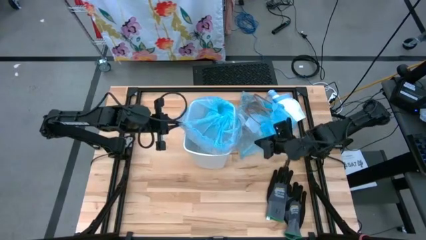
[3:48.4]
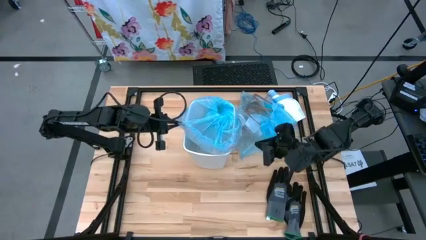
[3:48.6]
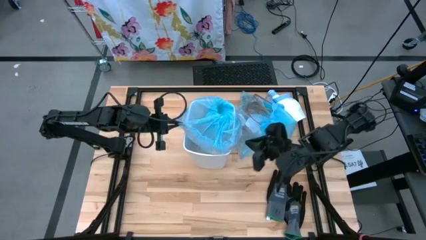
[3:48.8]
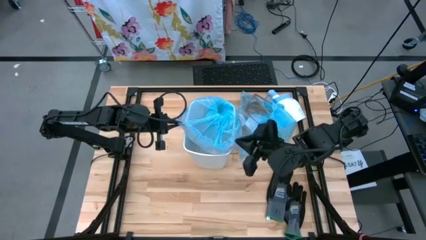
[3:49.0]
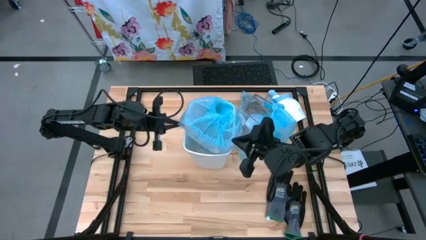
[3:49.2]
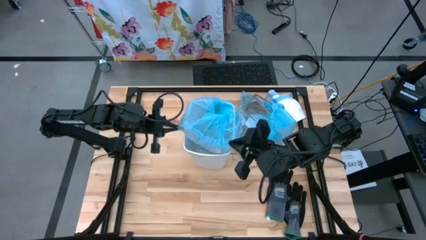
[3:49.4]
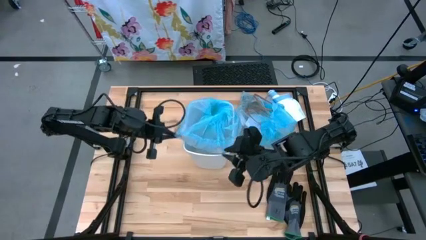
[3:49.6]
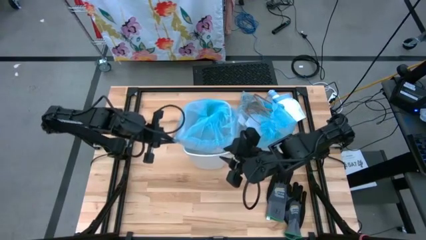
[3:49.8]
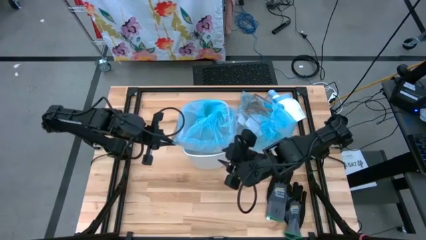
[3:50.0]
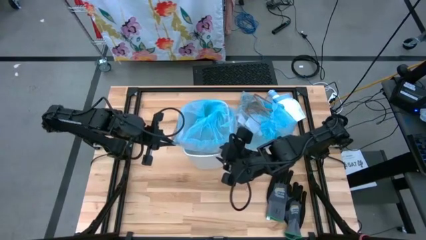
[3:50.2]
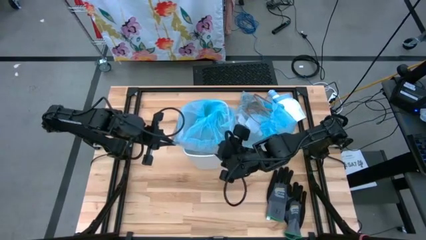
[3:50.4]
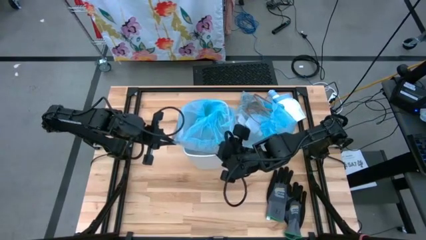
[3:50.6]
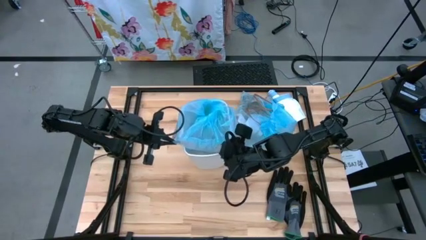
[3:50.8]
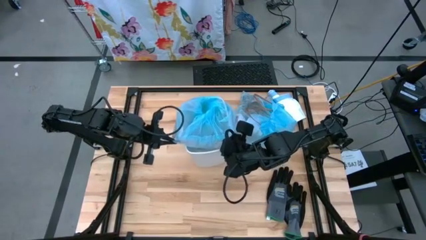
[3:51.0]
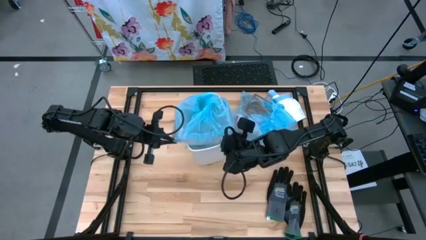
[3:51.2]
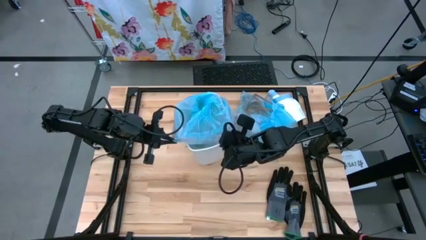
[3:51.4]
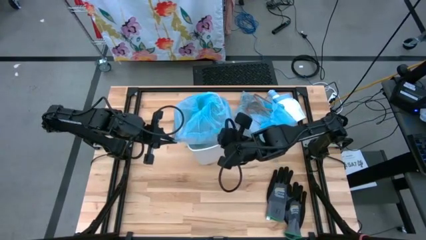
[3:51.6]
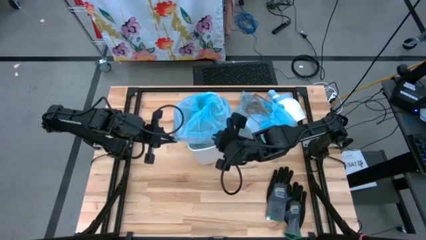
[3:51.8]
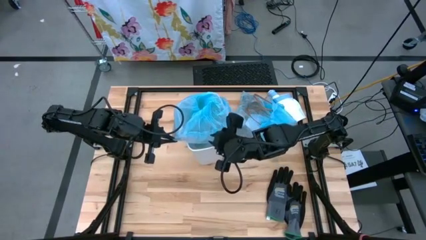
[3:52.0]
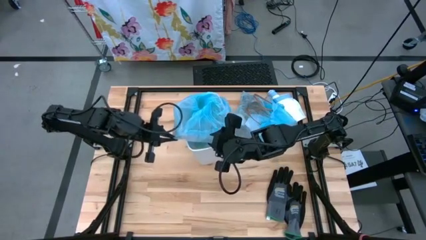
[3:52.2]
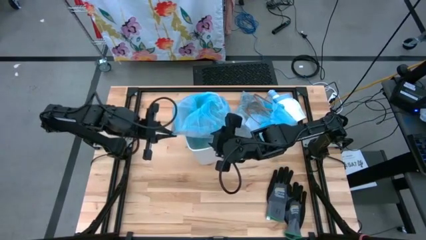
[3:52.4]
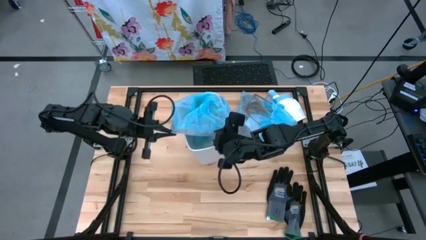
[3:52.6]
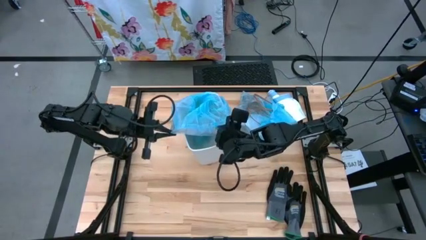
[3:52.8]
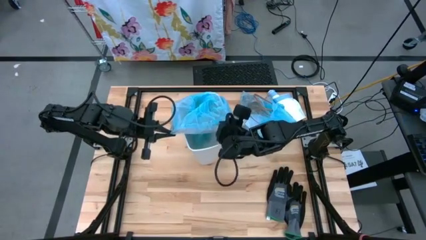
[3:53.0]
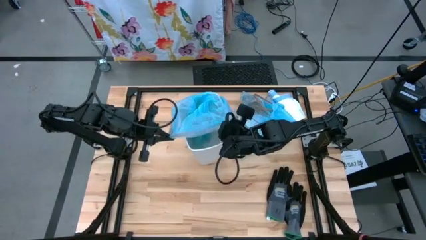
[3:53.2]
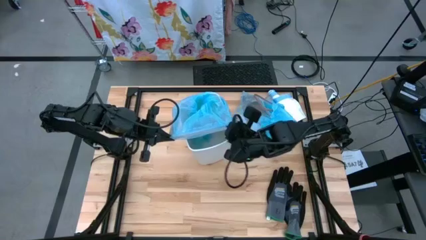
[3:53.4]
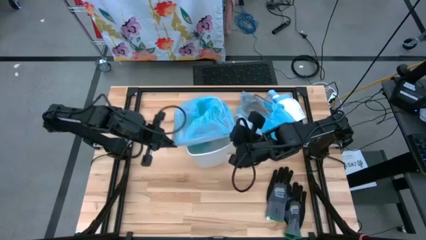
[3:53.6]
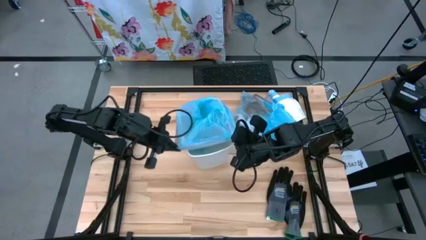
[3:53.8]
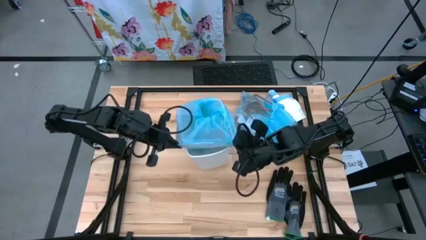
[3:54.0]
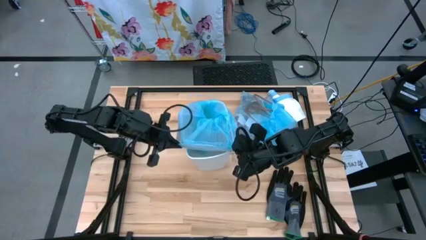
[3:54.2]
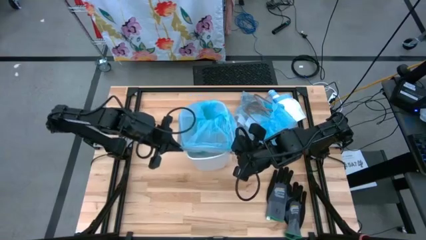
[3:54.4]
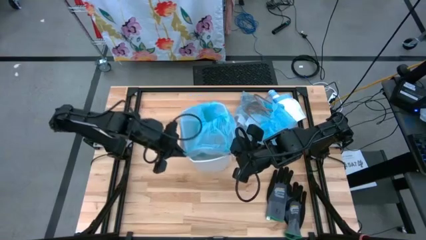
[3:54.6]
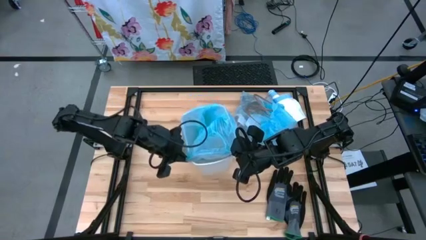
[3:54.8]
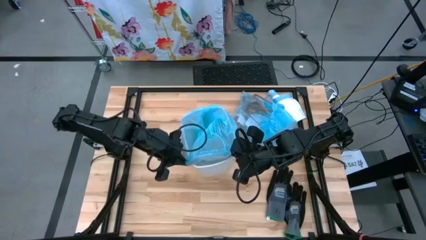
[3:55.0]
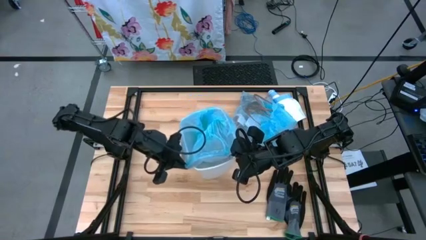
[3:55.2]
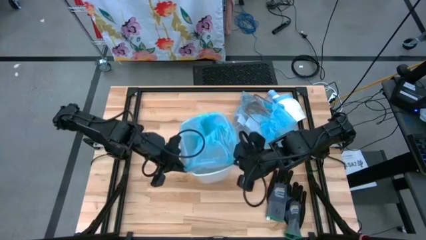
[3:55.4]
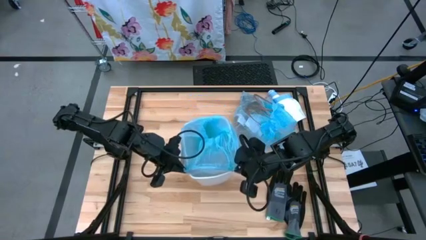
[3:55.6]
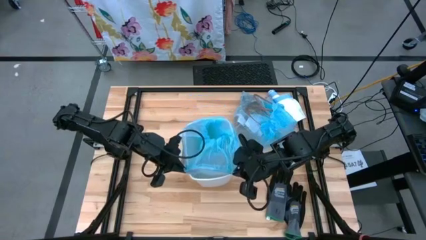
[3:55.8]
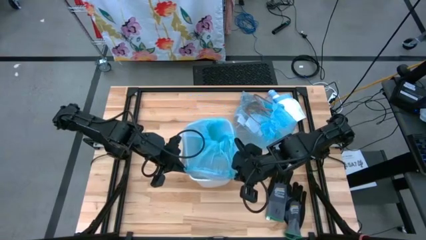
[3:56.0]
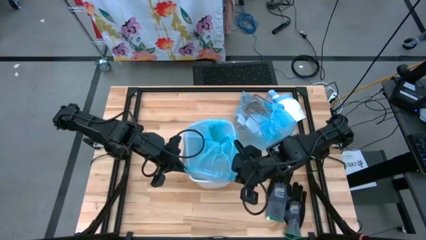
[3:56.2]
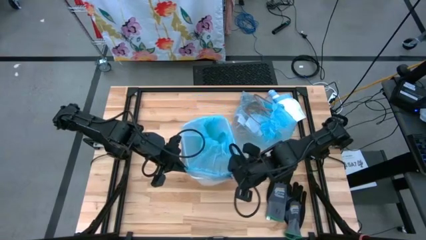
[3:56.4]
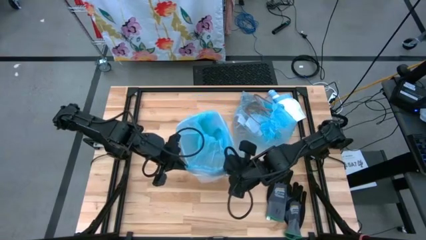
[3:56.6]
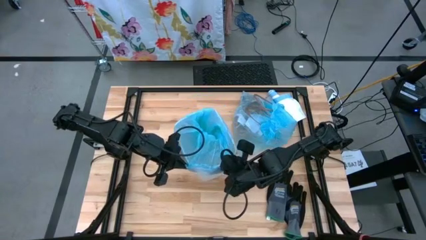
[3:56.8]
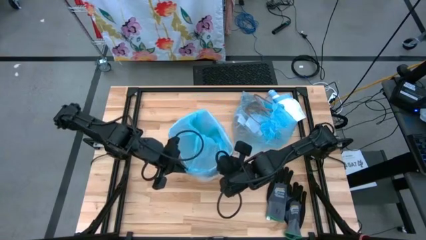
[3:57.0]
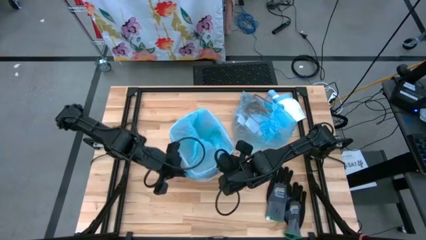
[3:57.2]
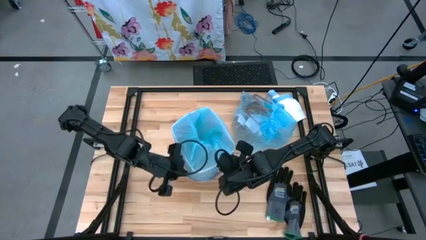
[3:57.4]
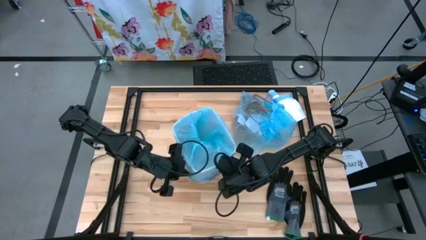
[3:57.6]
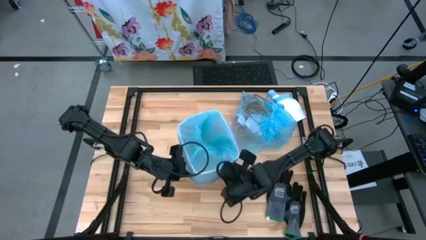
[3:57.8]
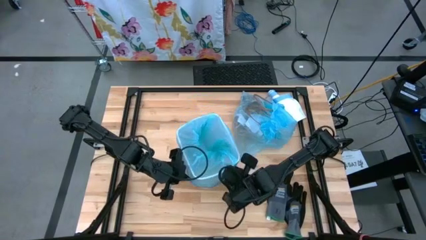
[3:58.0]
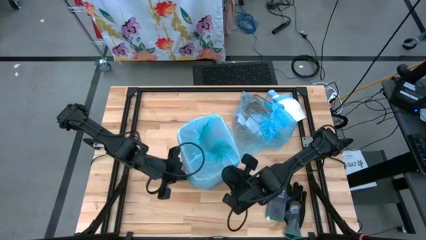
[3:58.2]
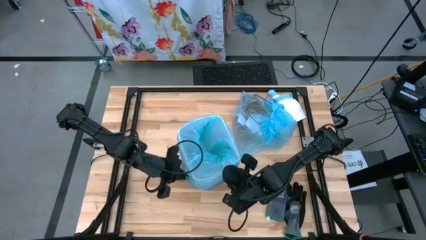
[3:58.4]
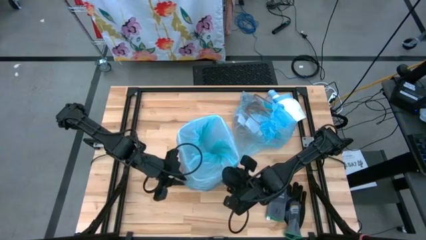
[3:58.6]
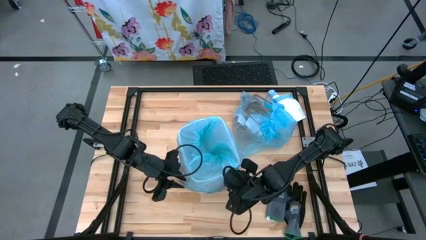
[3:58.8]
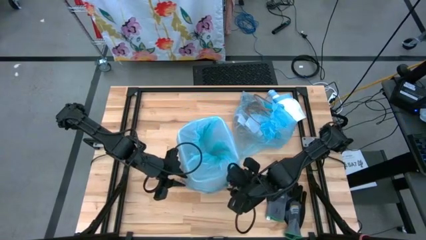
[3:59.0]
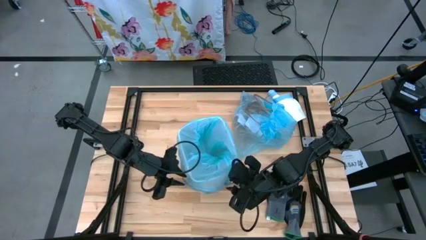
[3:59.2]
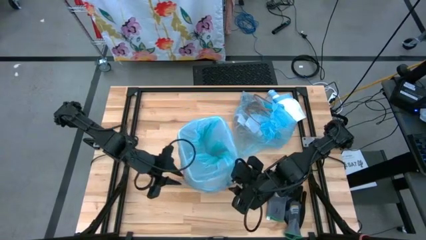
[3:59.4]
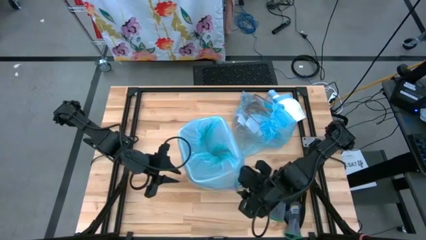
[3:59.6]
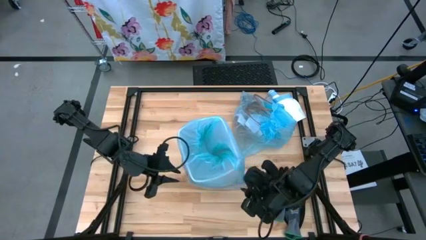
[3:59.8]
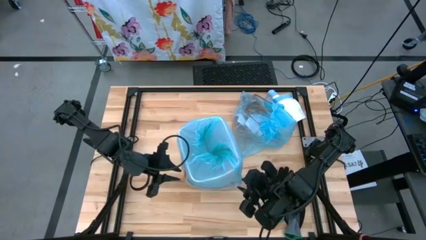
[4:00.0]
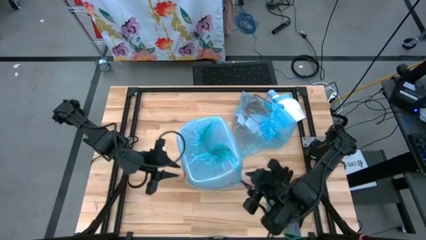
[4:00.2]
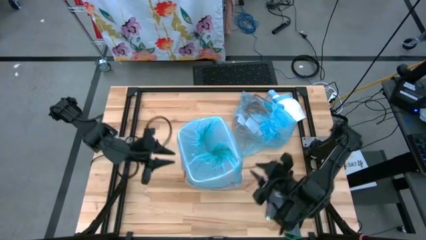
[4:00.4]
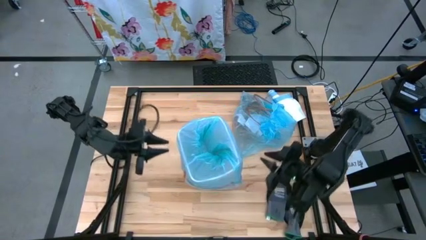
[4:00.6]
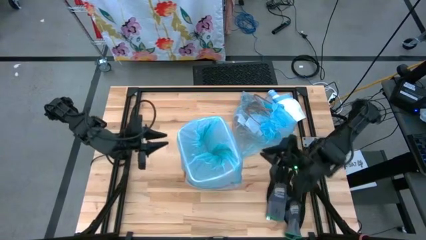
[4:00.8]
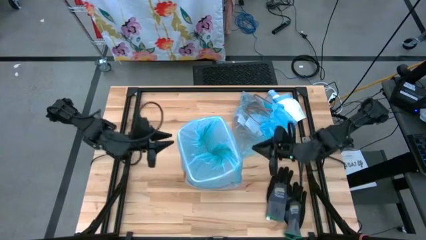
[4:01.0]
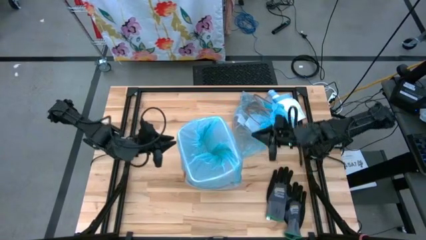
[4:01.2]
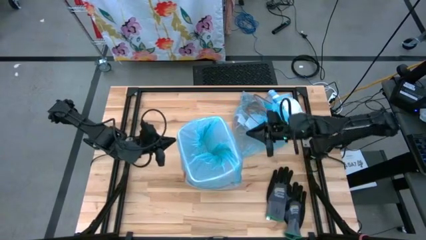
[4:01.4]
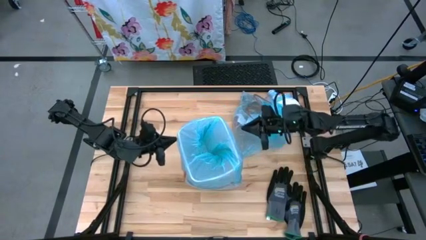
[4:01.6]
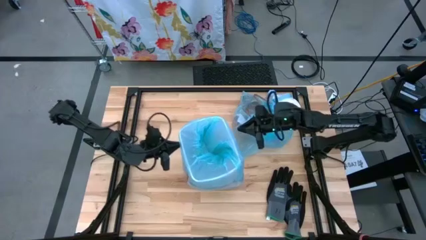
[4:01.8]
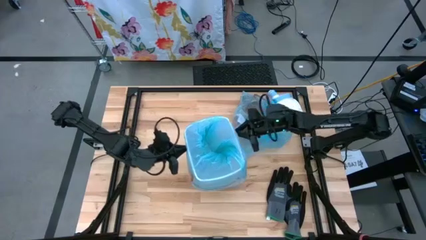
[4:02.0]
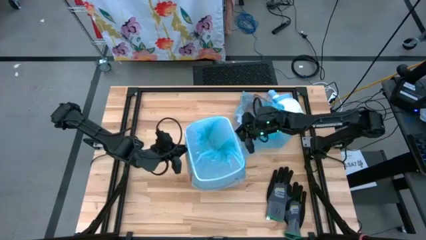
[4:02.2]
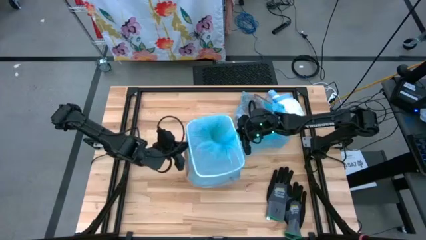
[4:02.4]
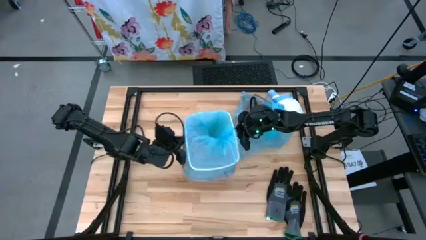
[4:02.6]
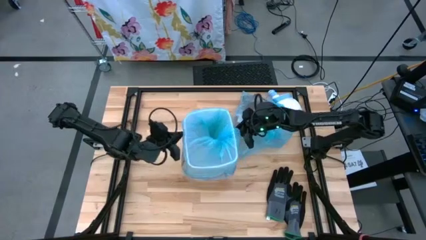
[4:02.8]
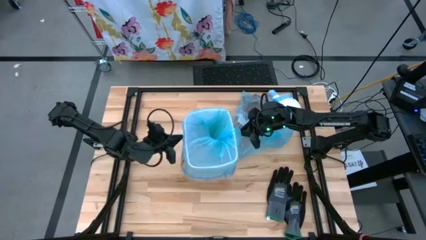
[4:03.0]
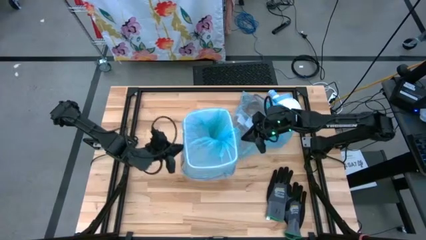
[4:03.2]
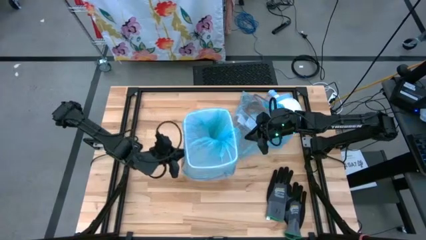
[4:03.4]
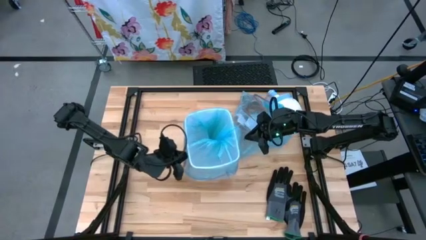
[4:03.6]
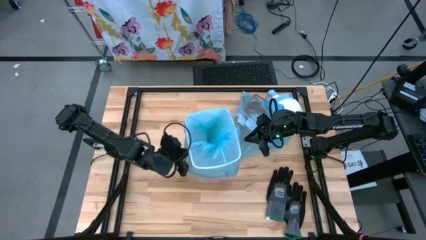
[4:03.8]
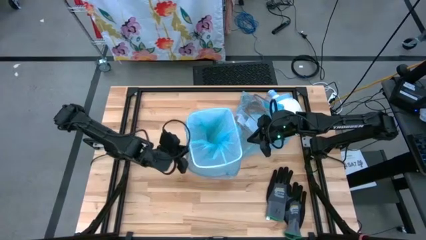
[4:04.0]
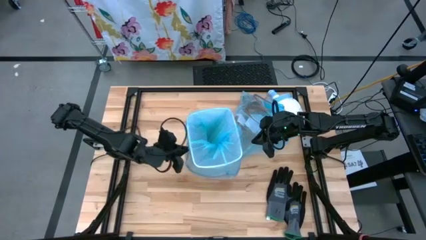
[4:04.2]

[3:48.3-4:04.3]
Task: place trash/remove bag and relplace
Insert the new blue trash bag into the white trash bin
